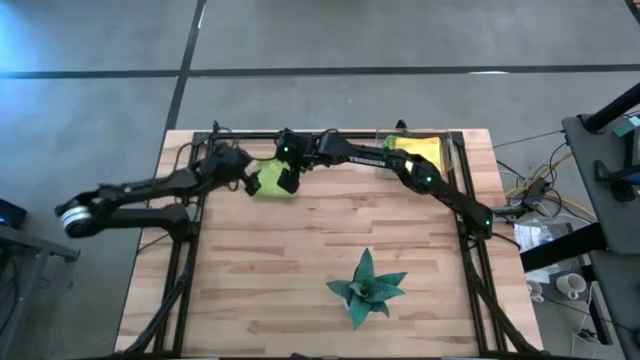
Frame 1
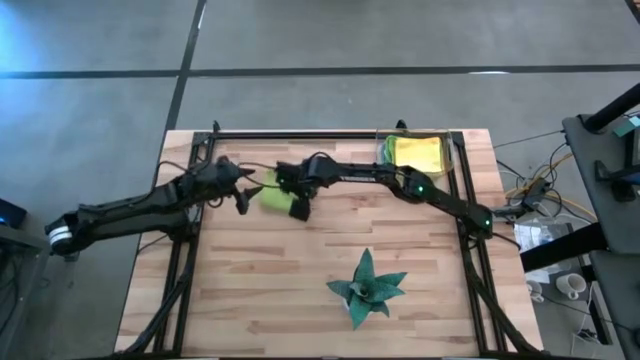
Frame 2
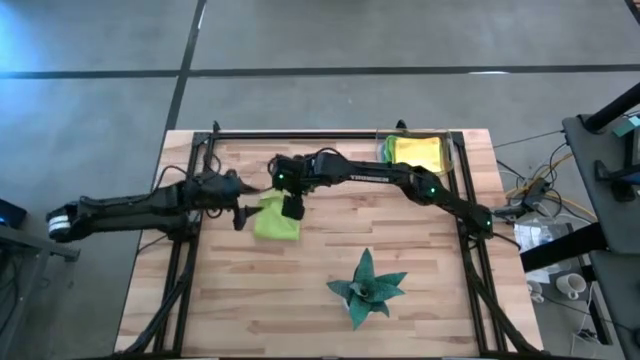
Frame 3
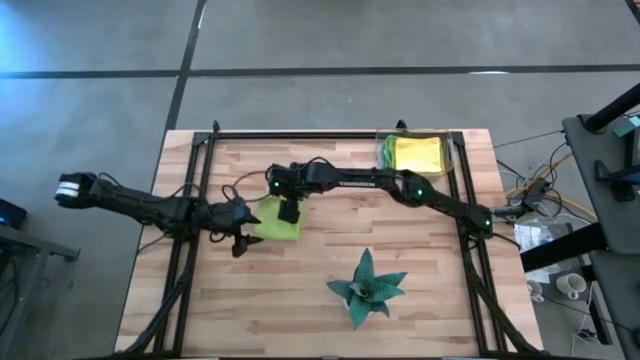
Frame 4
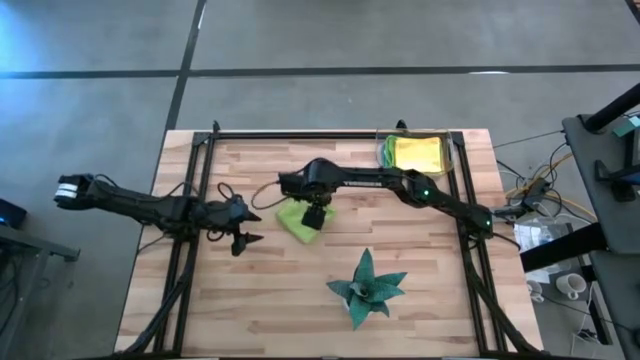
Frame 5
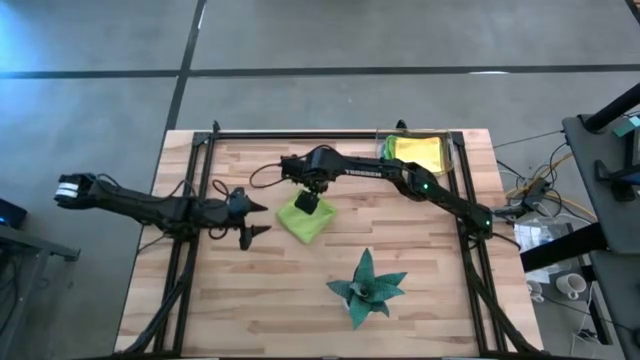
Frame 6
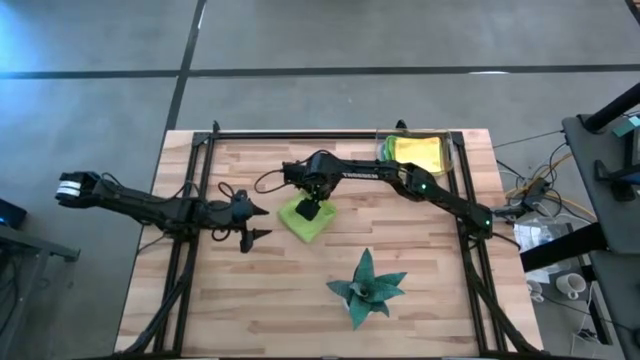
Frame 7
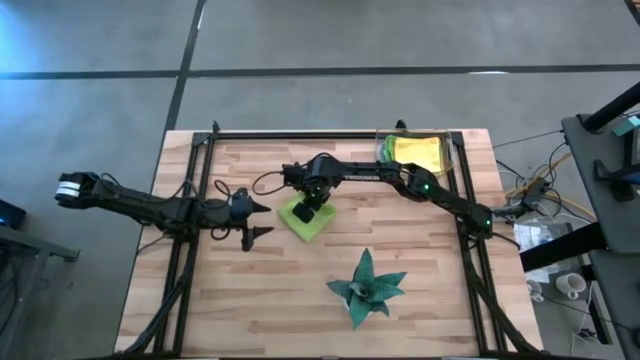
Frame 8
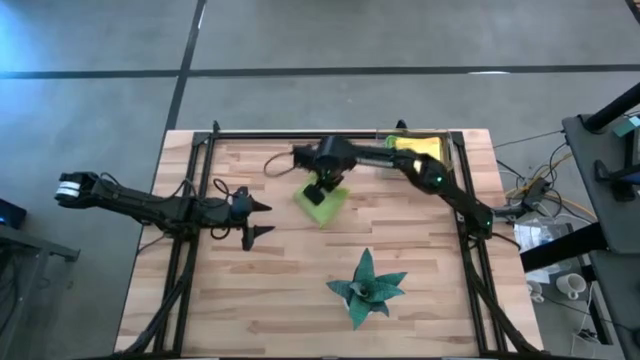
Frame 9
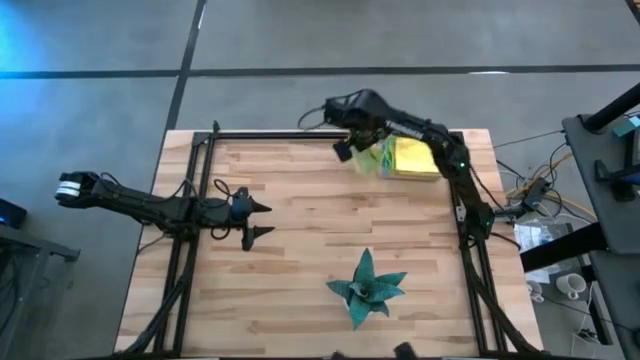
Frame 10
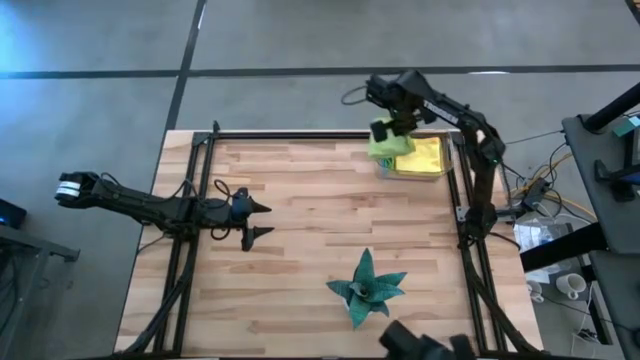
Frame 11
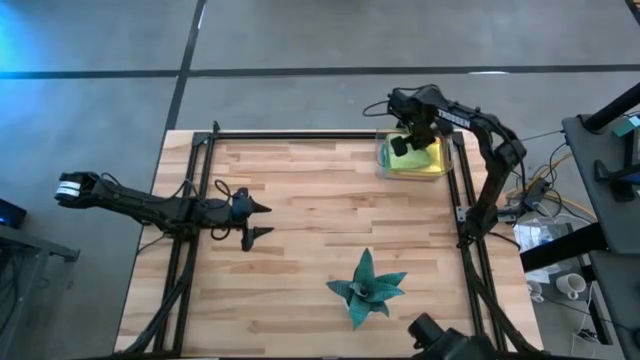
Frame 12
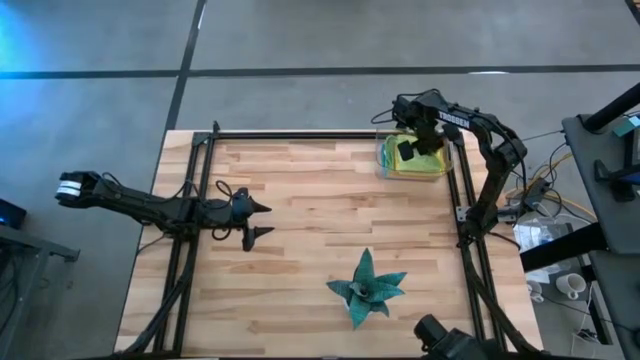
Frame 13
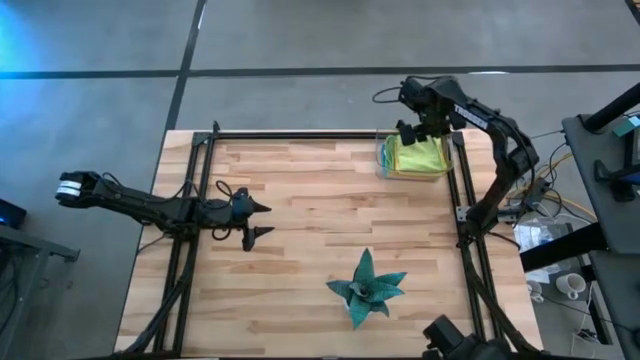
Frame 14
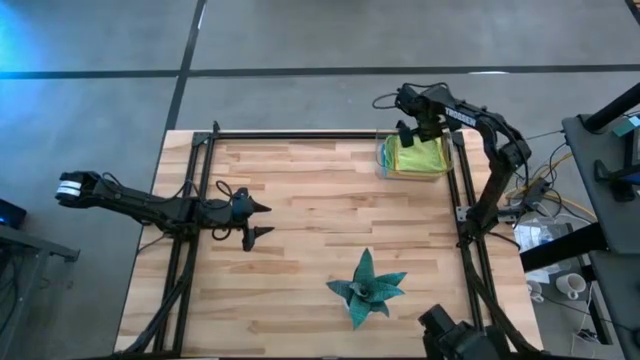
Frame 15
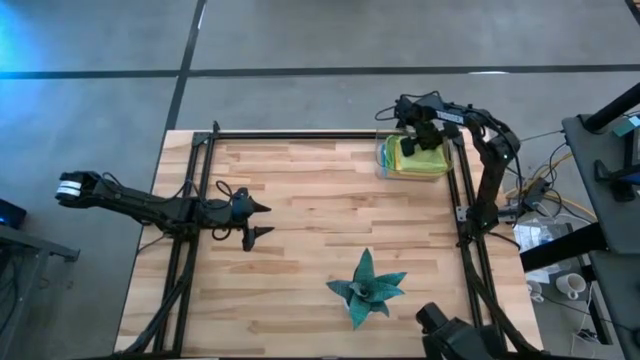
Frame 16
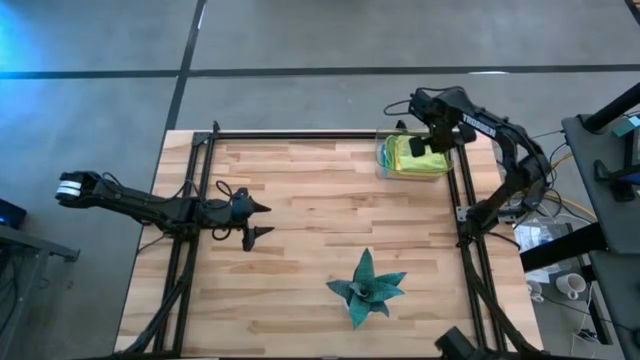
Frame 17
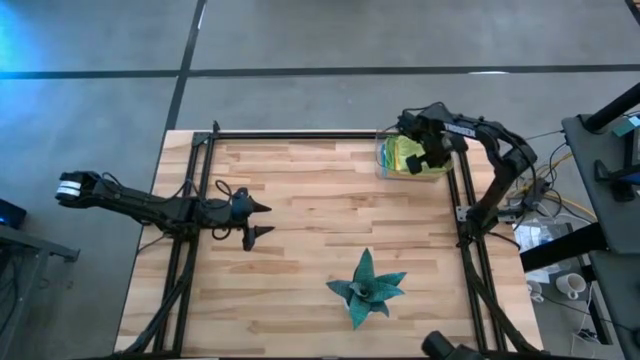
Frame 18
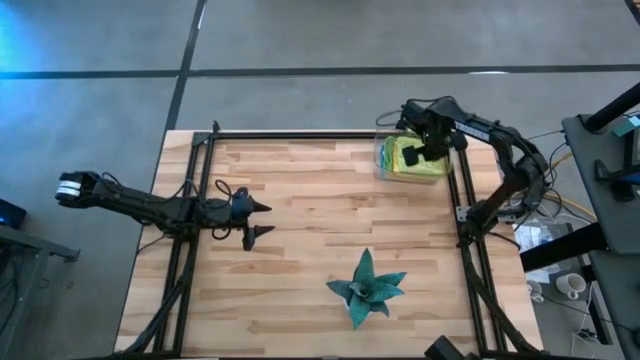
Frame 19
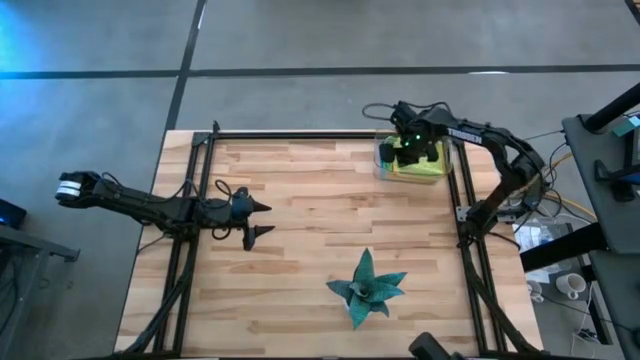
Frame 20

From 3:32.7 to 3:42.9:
Task: Fold microfiber towels
Put the light green microfiber cloth into the transparent bin

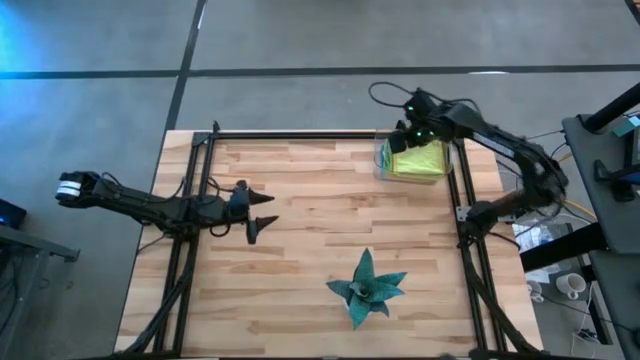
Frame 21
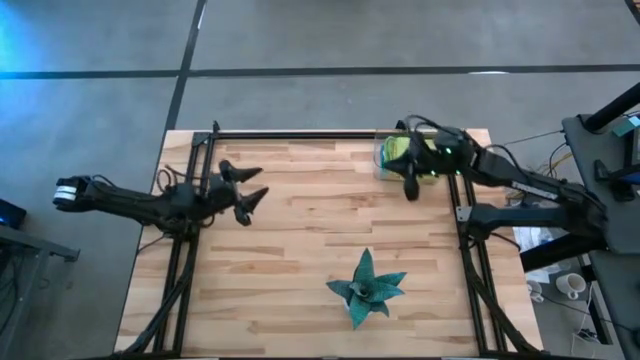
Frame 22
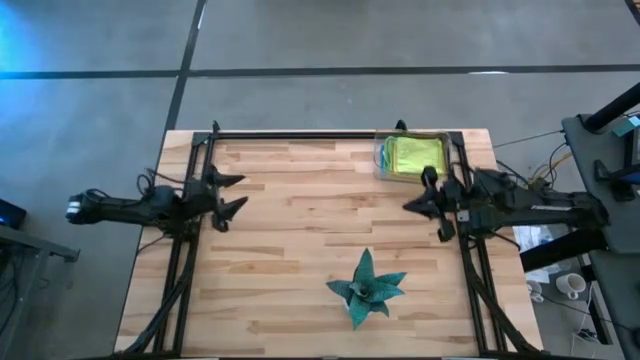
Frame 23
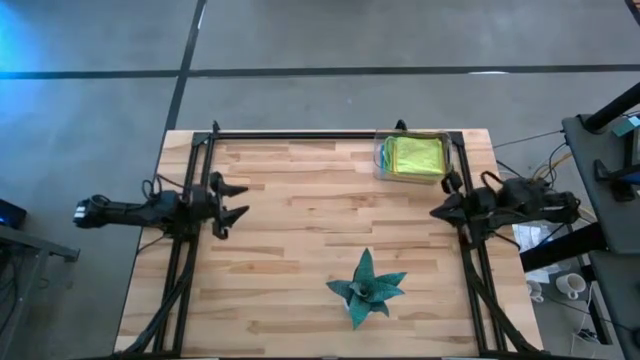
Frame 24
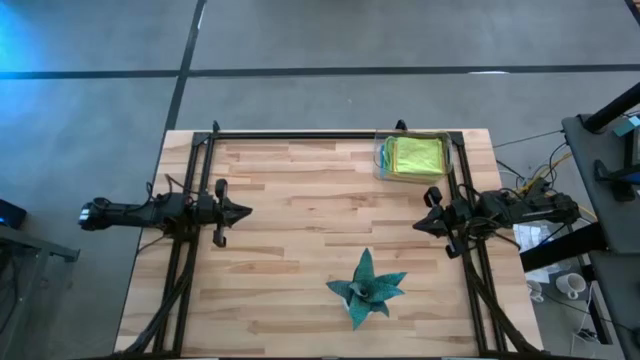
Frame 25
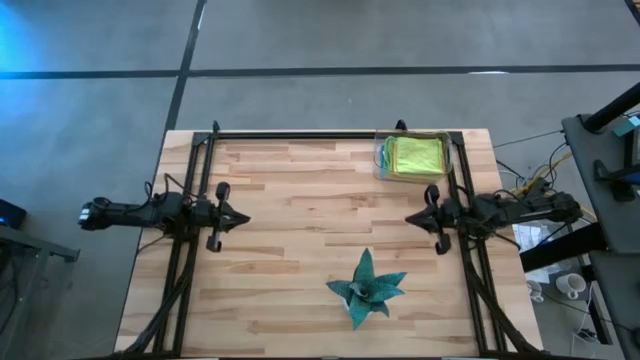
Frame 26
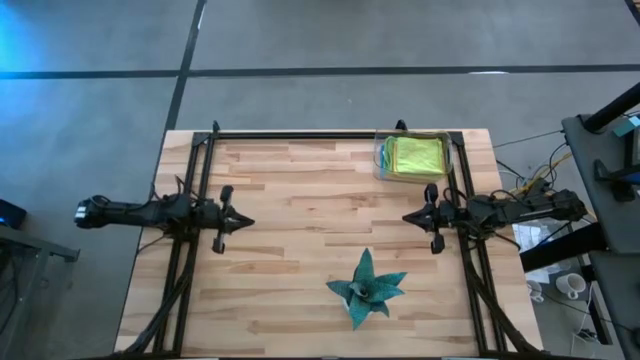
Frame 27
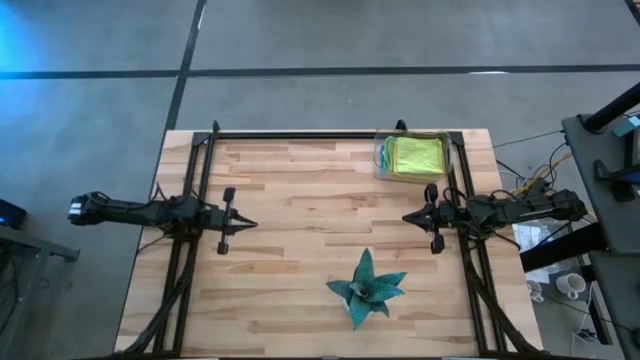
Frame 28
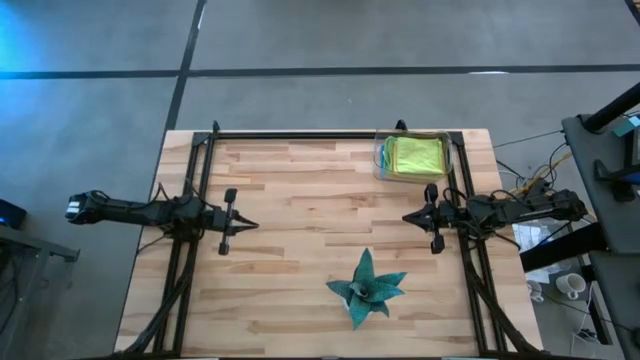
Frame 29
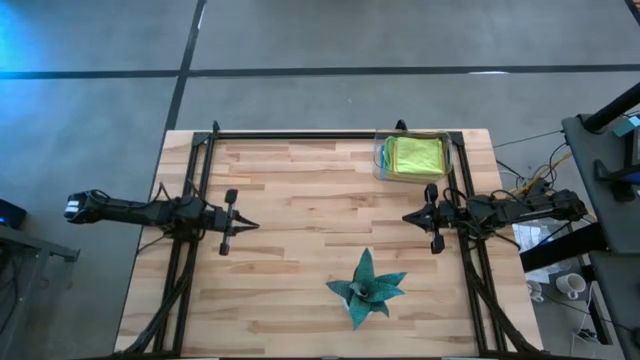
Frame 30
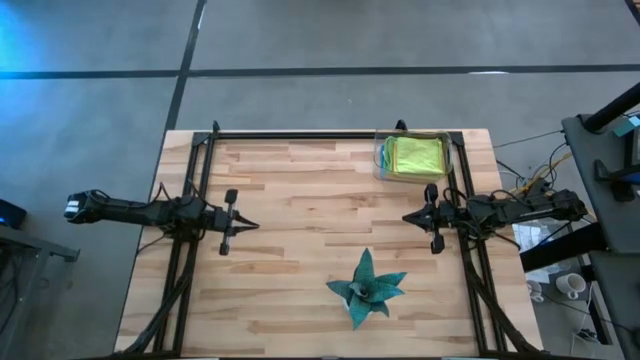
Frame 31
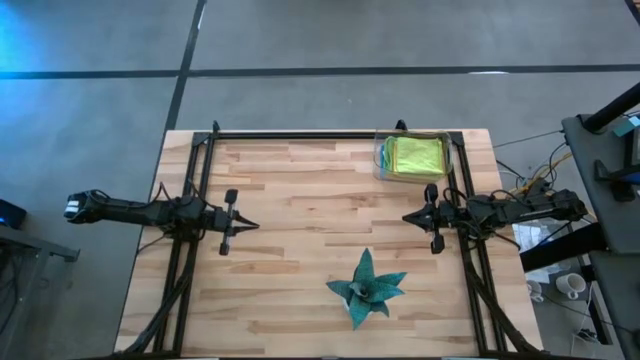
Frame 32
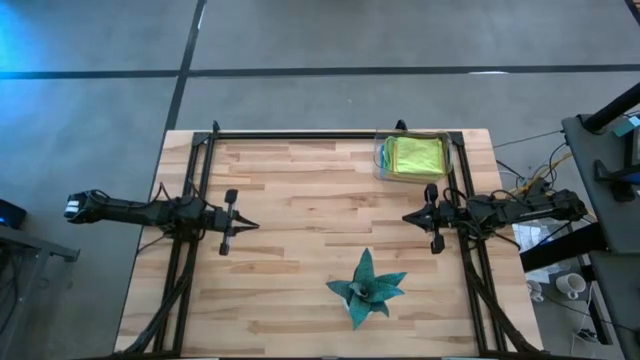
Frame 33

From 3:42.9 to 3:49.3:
Return to Home Position

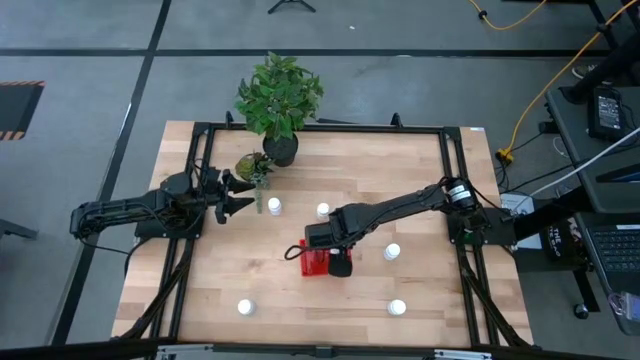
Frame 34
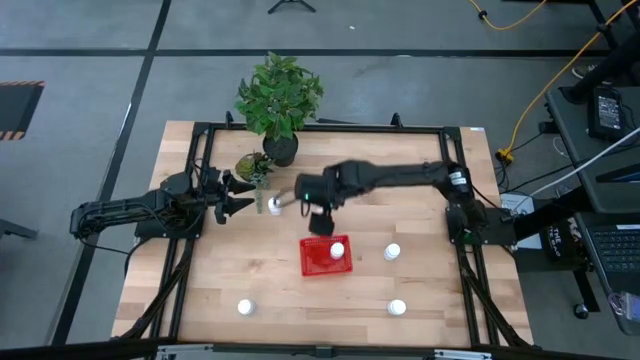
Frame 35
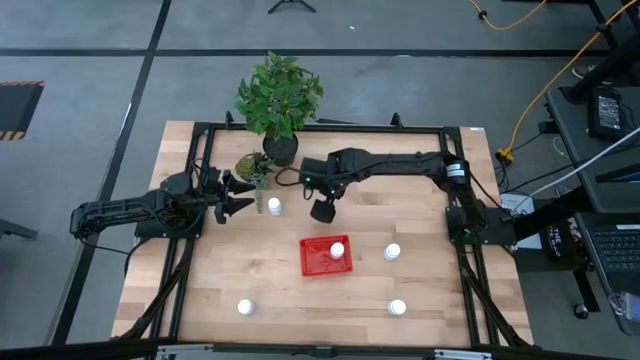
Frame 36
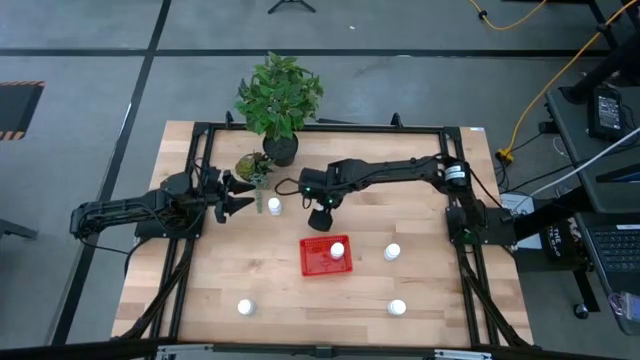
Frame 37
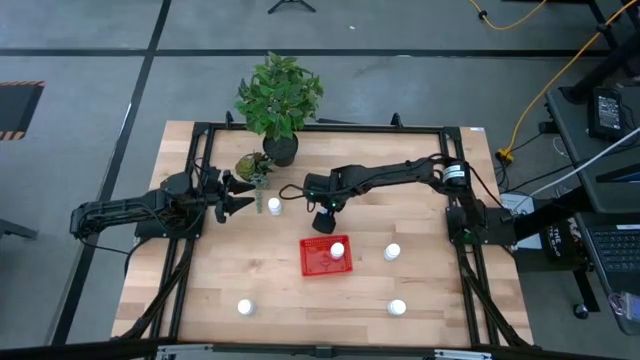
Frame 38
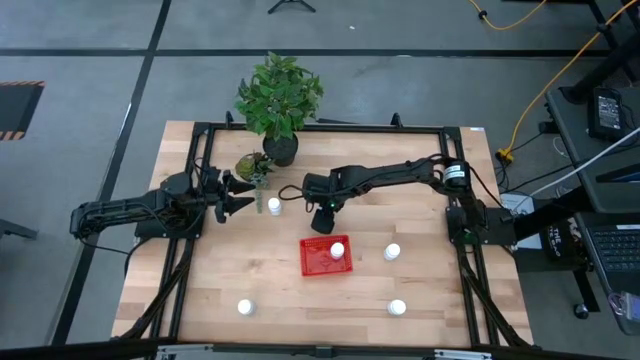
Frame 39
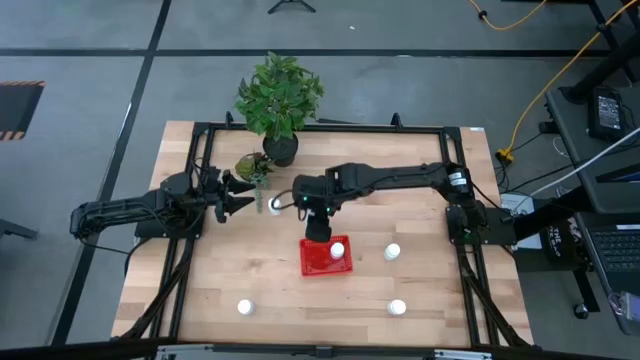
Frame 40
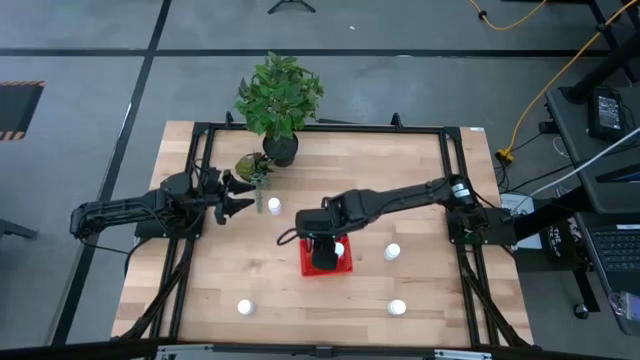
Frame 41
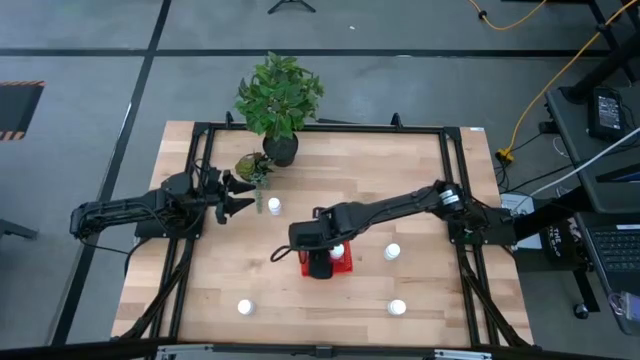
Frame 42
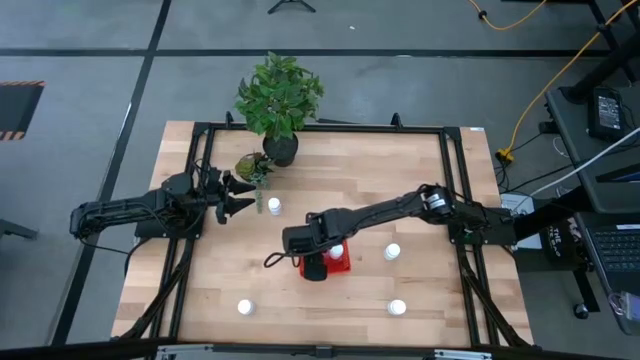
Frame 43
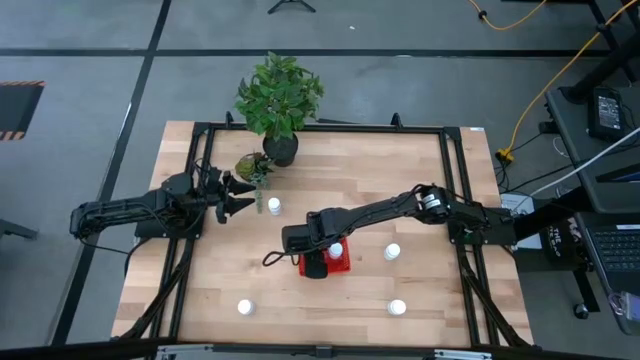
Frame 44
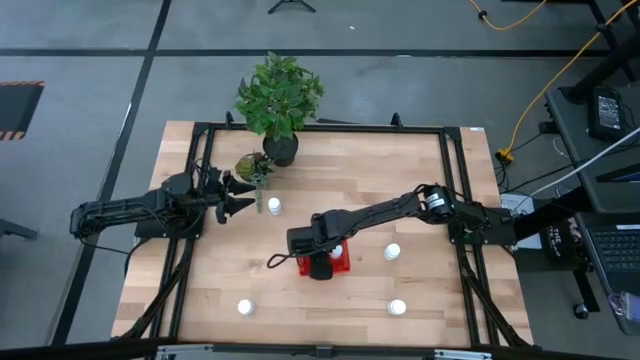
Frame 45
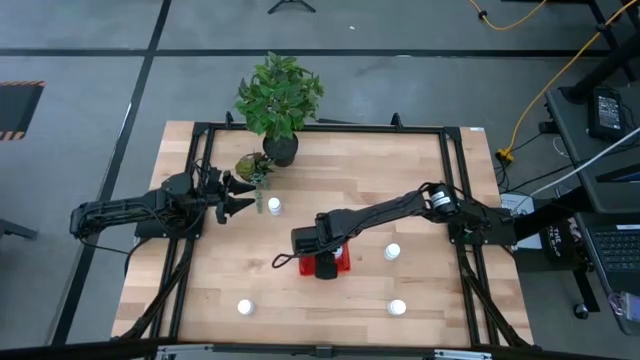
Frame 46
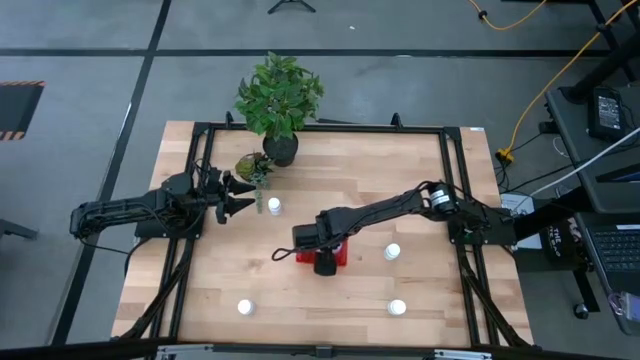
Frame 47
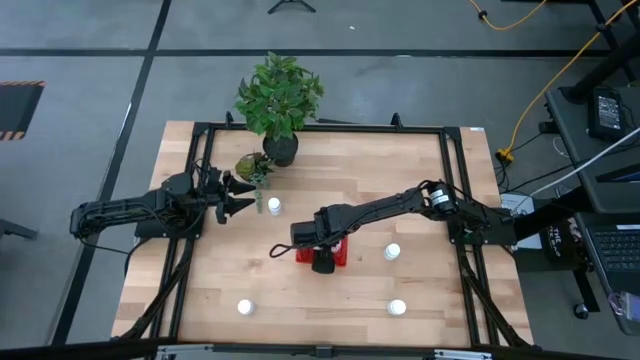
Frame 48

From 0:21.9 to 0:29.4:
Task: Pick and place pill bottles into a basket
Put the white pill bottle into the bin
